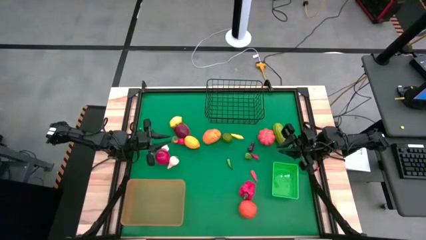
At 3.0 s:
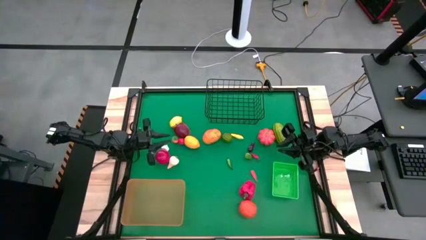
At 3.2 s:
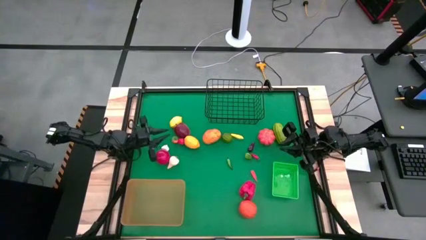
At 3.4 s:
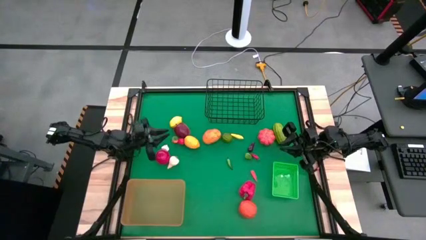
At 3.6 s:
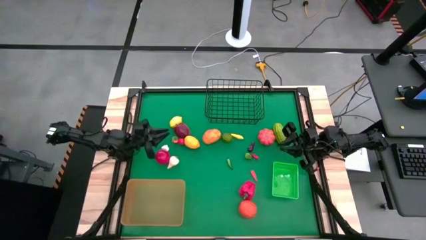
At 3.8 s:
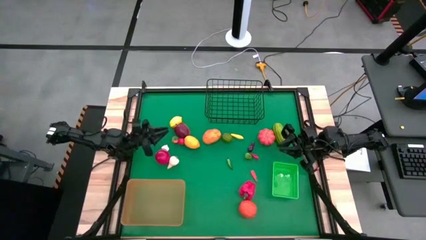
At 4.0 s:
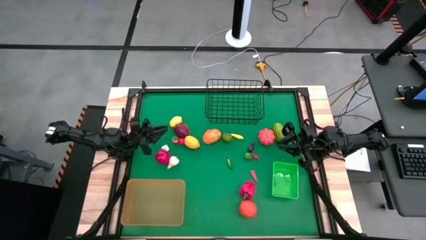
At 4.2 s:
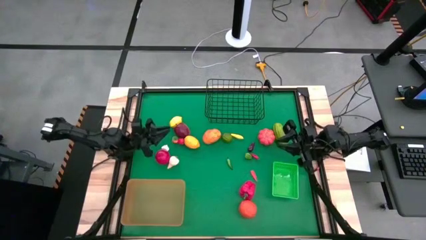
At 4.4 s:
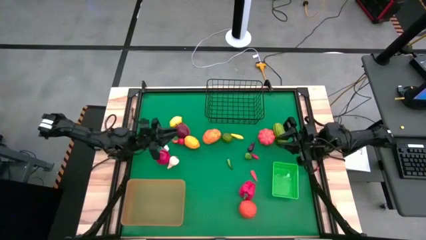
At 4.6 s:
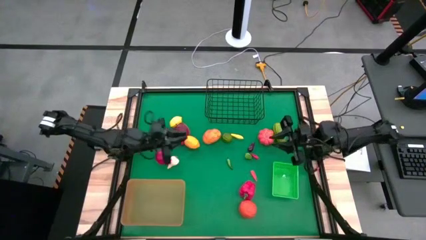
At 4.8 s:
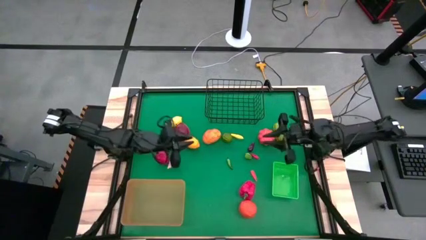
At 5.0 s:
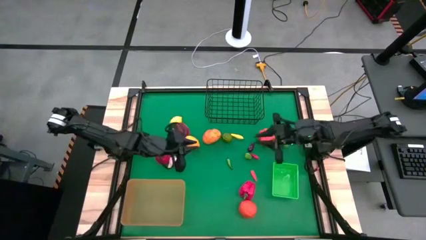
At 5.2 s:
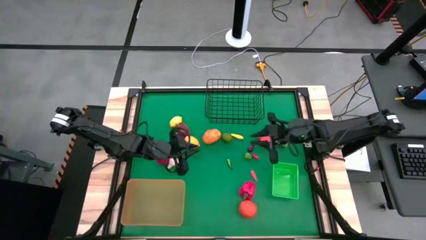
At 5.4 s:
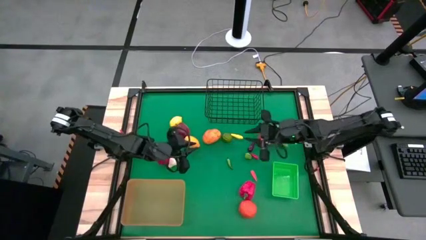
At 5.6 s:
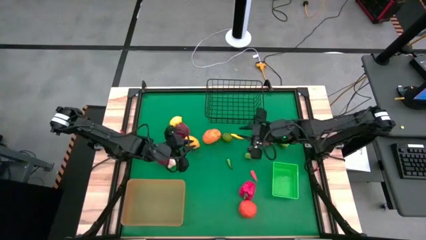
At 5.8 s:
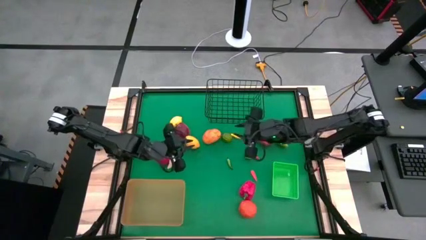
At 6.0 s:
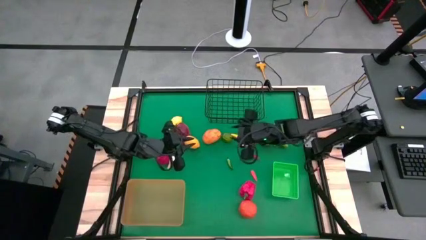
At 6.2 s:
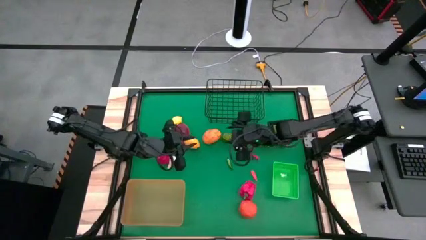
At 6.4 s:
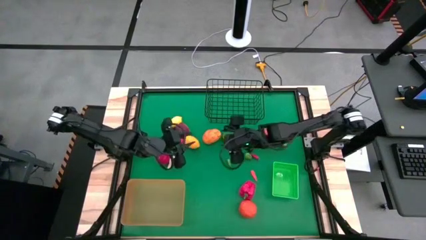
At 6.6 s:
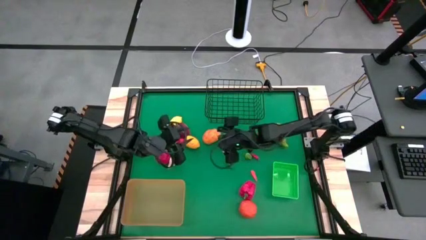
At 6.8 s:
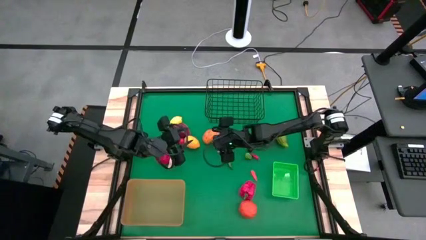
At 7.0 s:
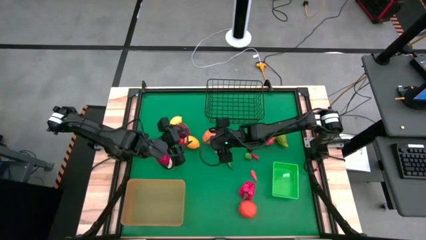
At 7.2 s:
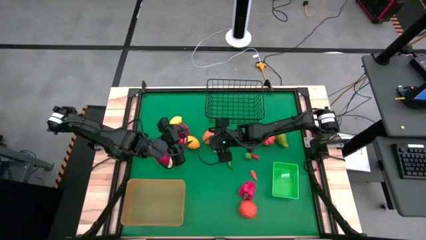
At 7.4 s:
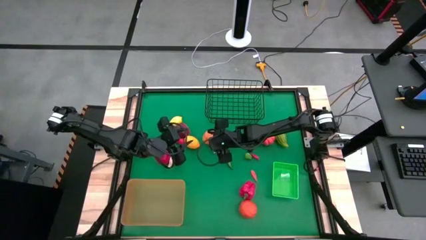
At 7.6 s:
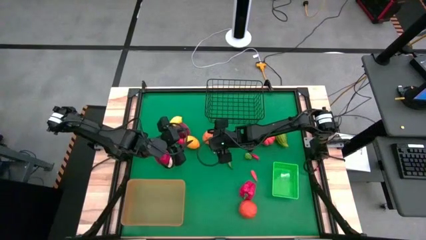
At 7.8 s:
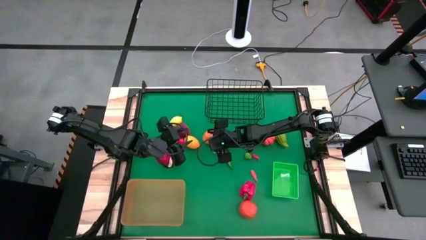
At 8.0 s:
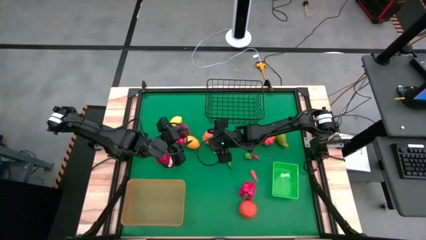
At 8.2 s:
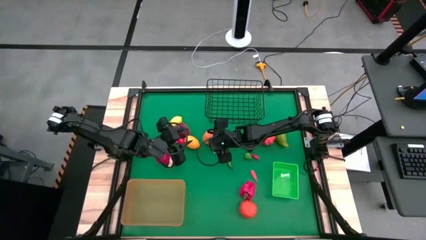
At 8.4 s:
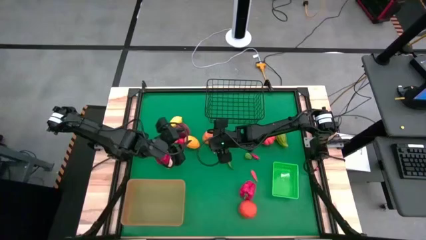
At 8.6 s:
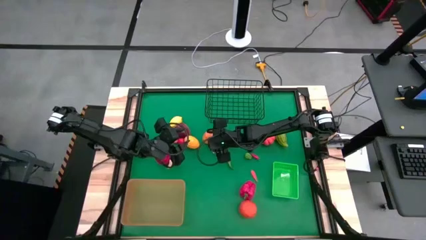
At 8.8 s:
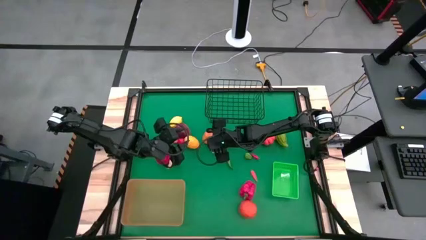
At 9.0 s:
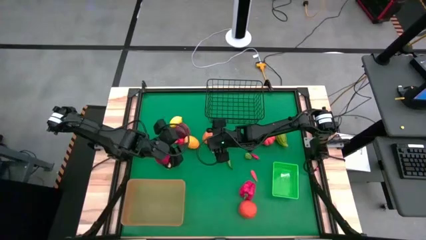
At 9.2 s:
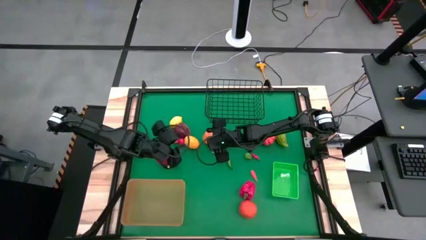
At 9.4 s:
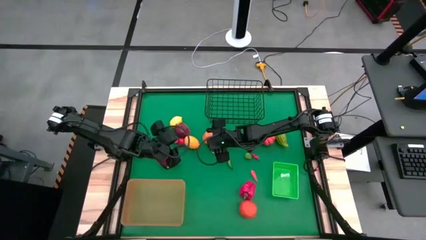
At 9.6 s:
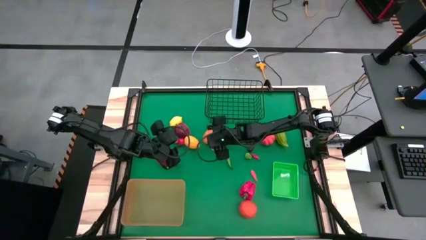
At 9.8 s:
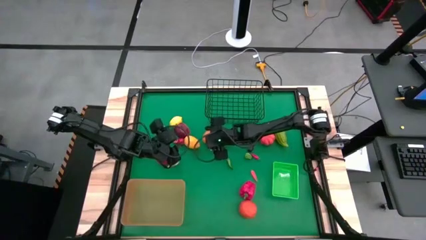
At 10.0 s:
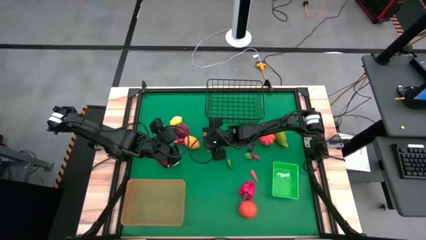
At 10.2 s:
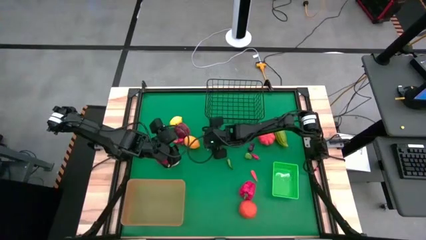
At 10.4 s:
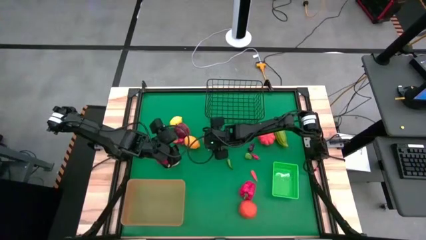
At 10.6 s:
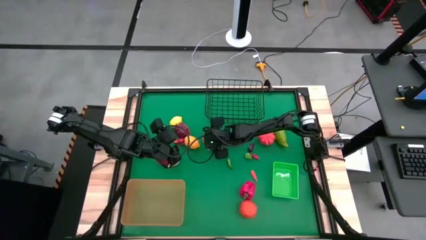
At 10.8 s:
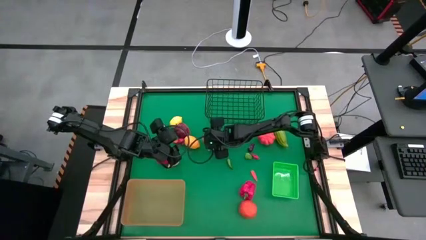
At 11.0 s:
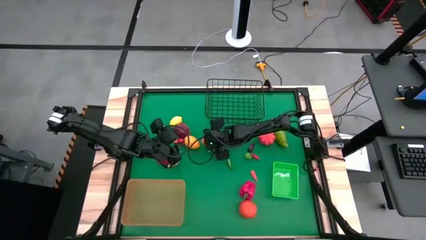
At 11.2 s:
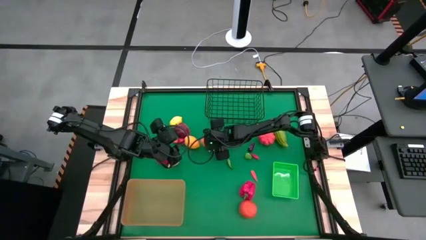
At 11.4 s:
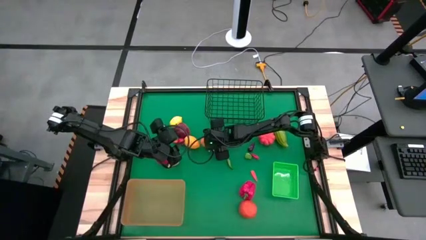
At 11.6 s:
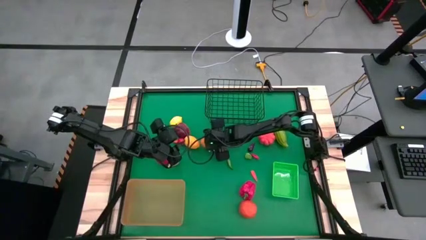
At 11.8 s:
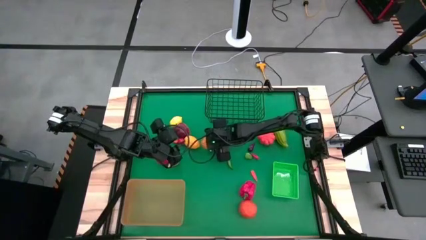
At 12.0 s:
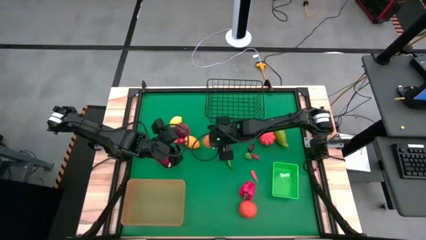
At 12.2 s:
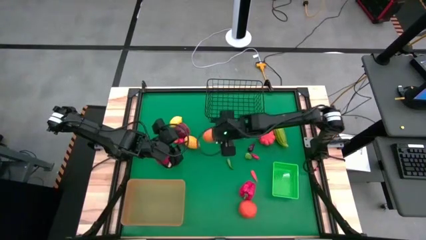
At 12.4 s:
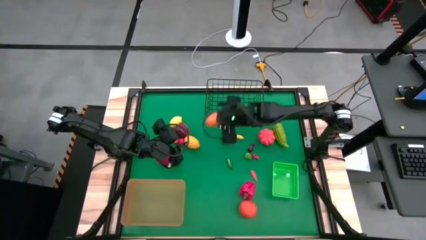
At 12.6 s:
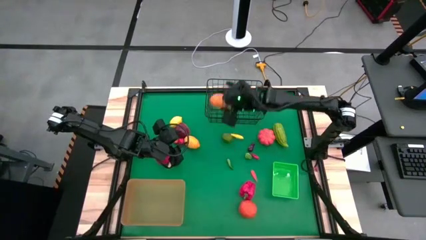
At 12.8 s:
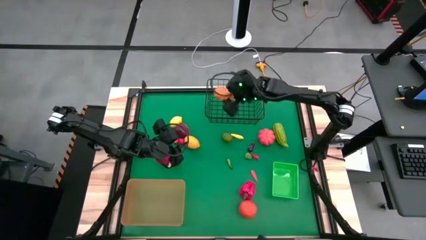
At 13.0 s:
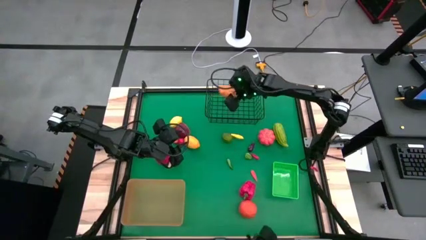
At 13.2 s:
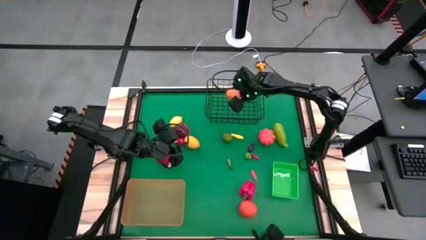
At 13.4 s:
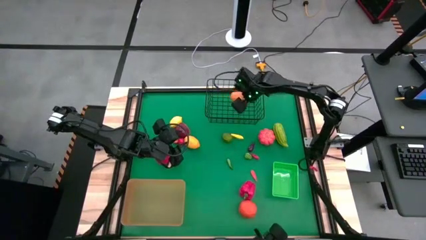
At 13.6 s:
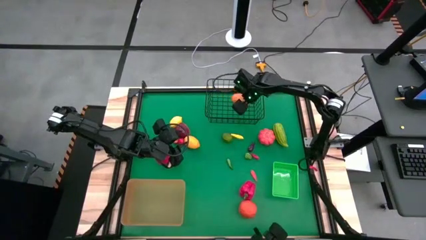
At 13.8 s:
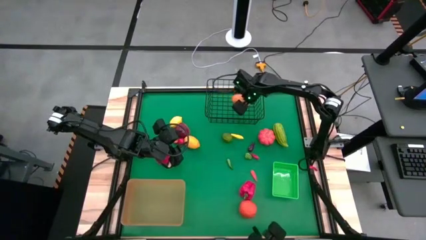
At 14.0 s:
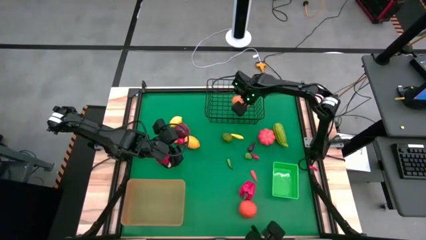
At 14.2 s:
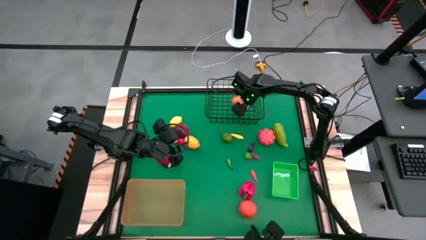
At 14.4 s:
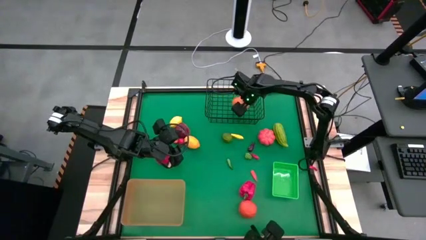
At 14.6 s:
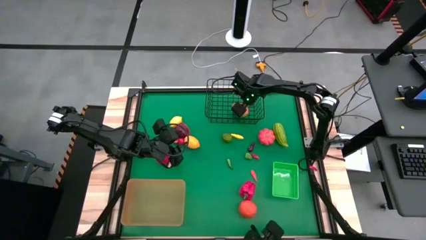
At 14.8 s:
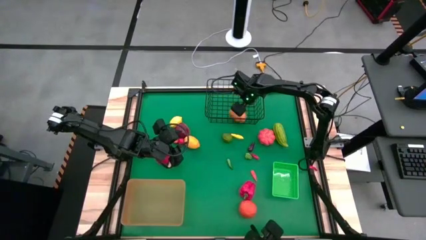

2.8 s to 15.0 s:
Task: Sort produce into baskets
Put the potato into the black basket

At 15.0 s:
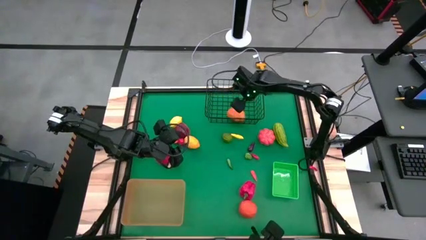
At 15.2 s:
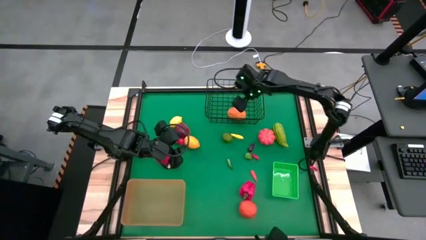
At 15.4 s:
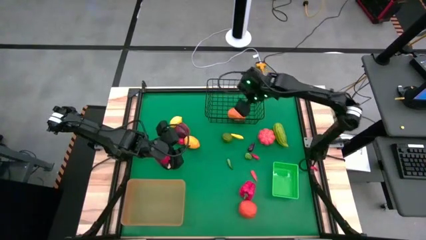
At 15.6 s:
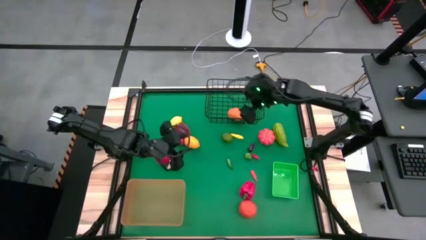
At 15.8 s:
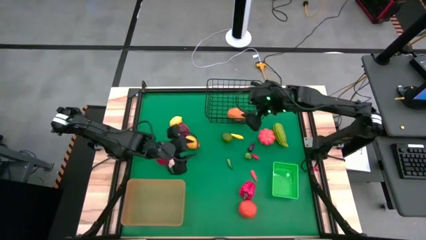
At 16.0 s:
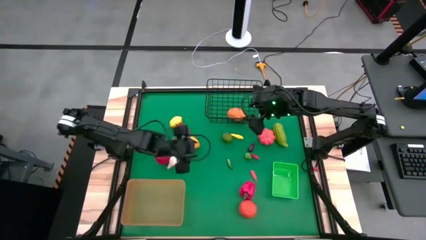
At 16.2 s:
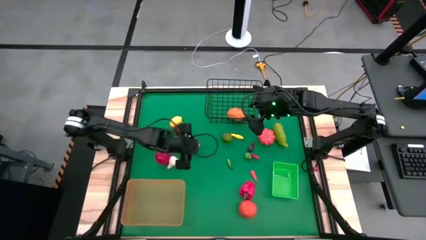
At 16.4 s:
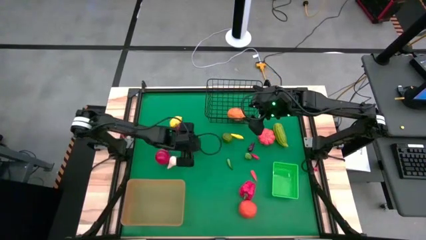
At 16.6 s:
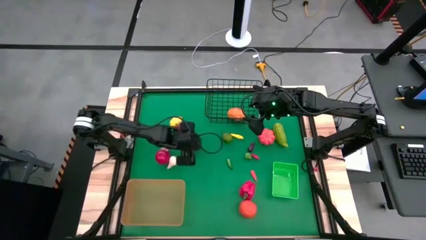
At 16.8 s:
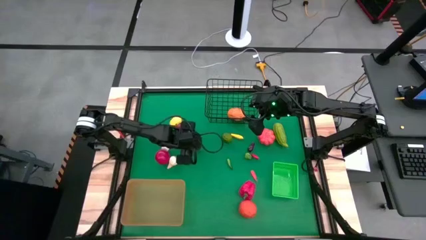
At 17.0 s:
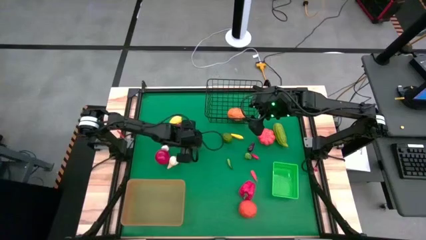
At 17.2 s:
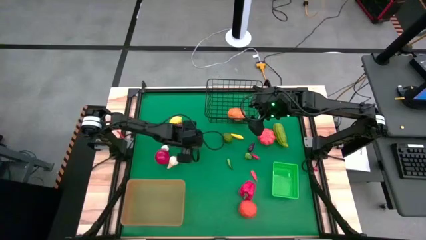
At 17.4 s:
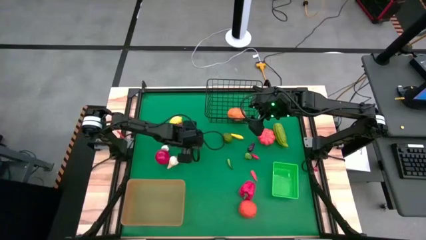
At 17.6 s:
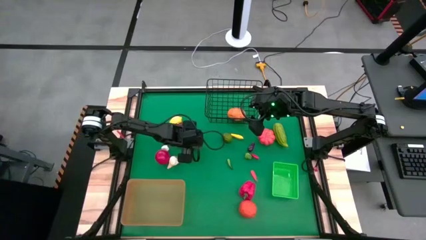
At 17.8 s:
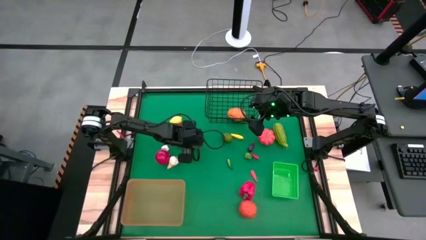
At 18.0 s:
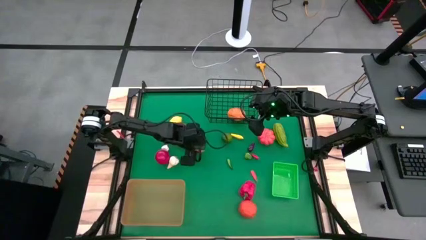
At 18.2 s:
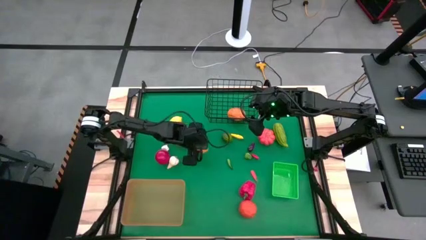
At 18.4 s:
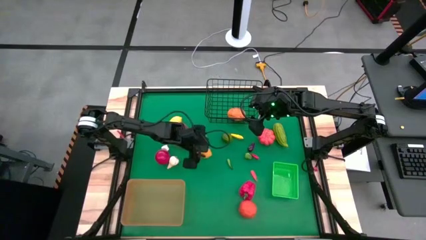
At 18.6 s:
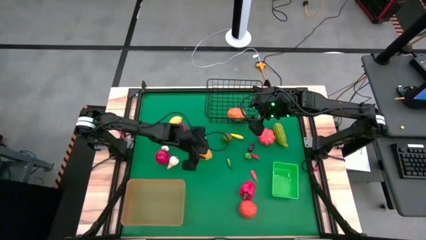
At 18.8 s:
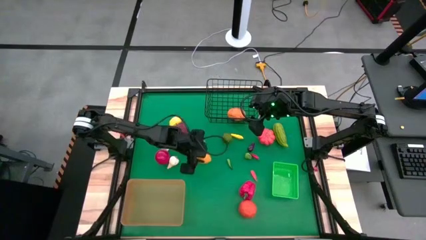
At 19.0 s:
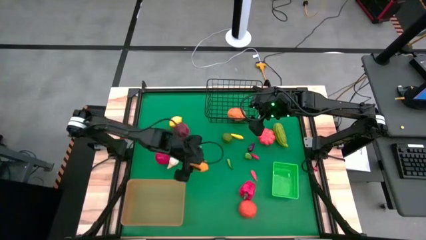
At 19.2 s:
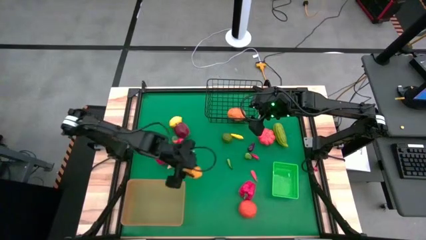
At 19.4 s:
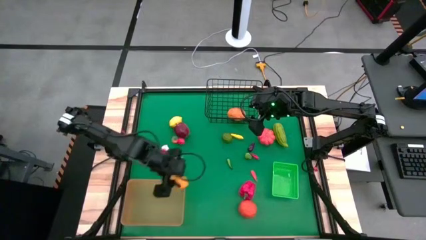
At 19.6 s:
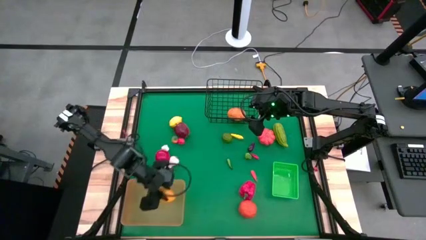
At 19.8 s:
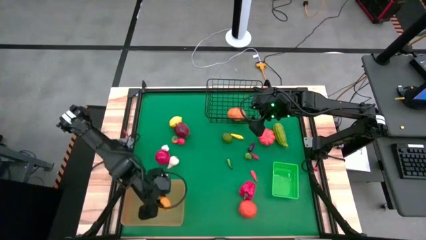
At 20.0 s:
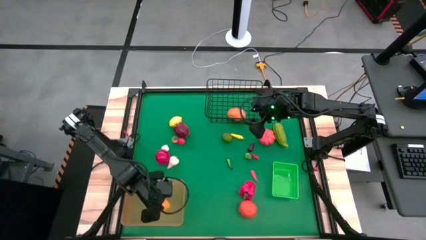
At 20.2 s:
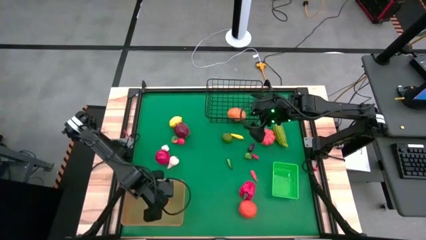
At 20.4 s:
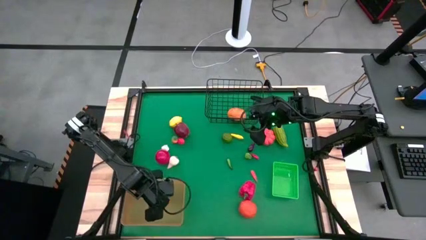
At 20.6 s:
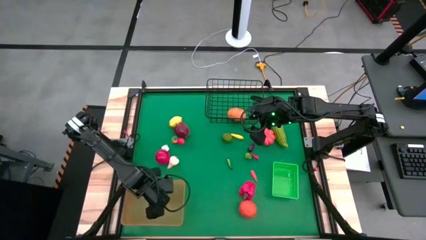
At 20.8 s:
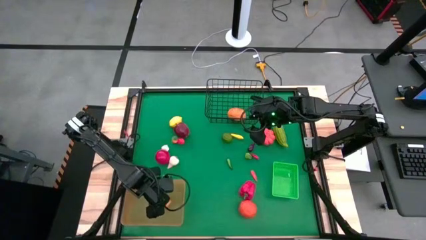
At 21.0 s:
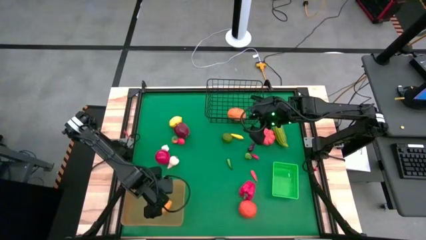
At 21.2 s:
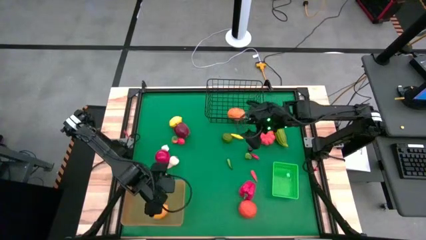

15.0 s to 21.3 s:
Put the bottom lemon into the orange bin
